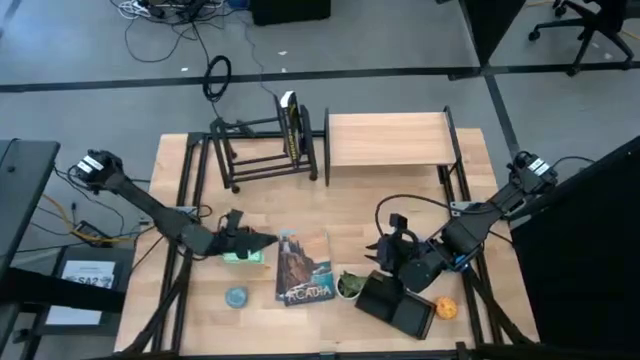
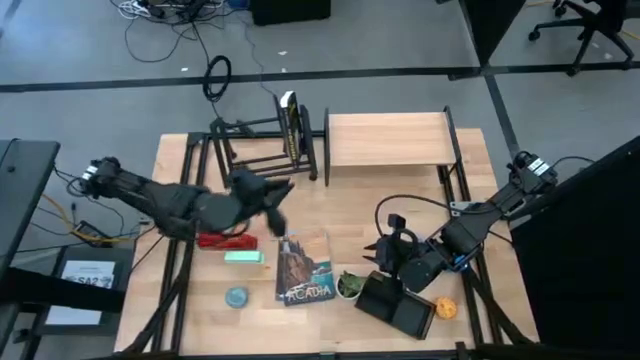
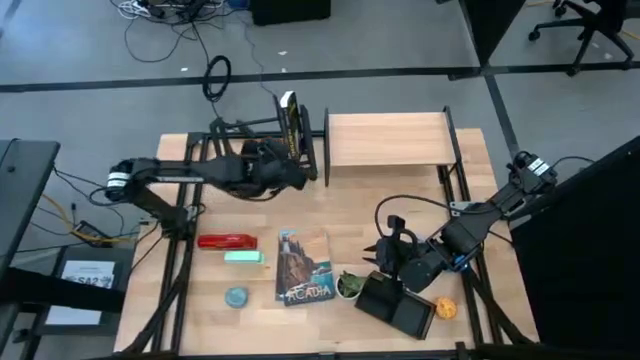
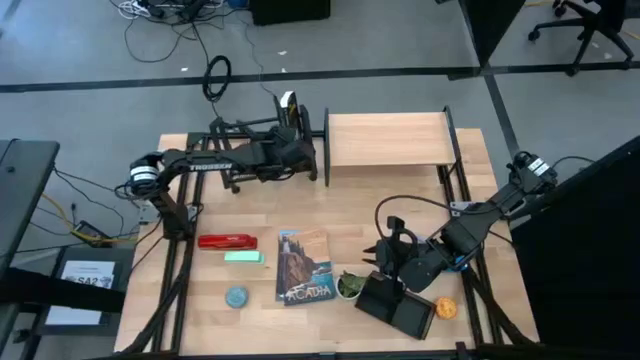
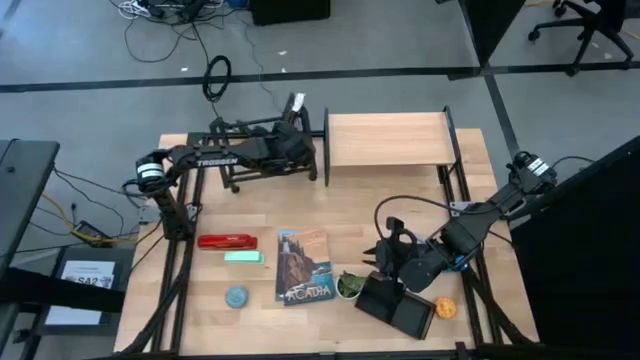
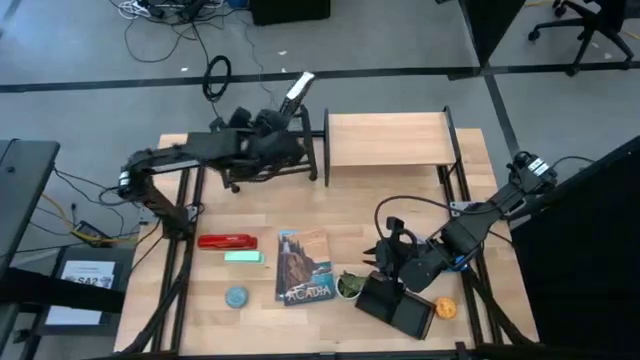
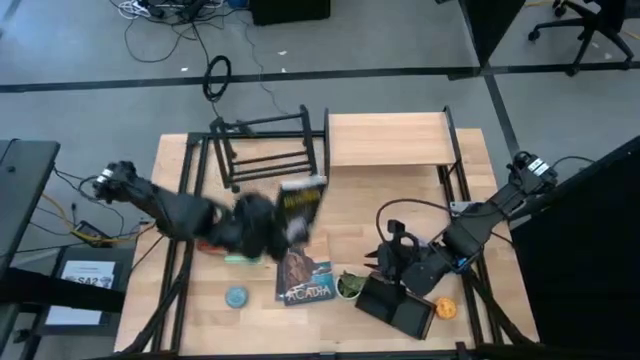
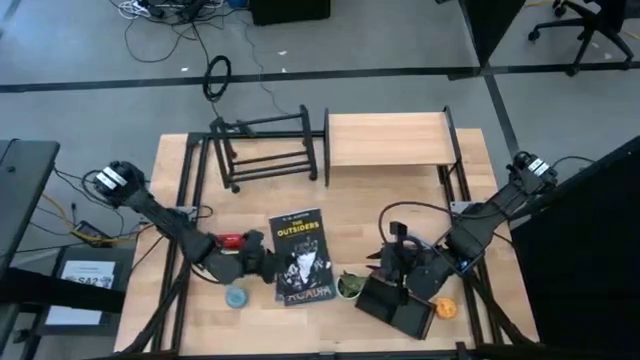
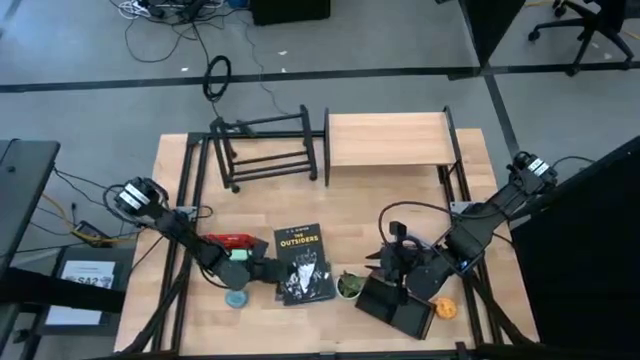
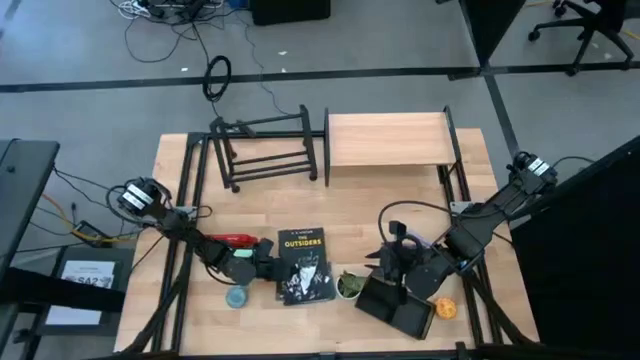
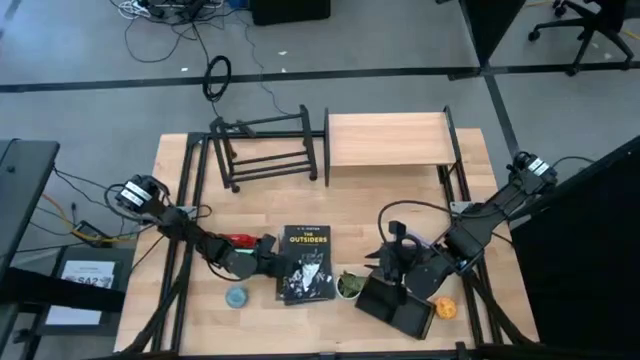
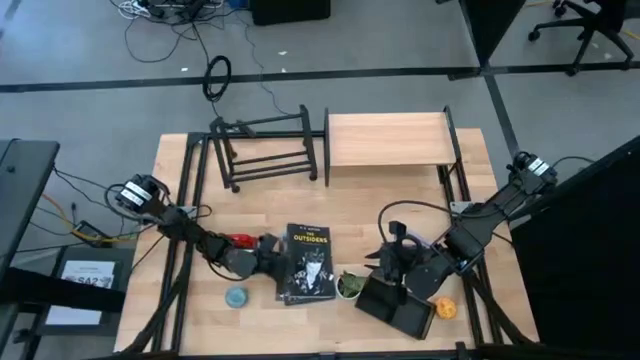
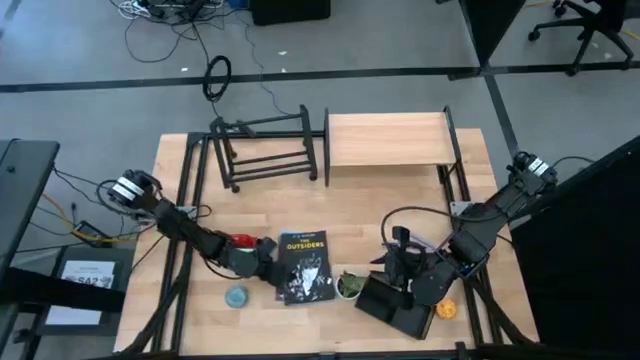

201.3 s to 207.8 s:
Task: Stock shelves
Remove the black book from the book organizer

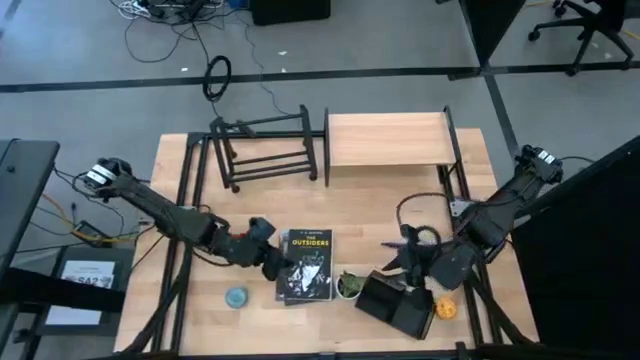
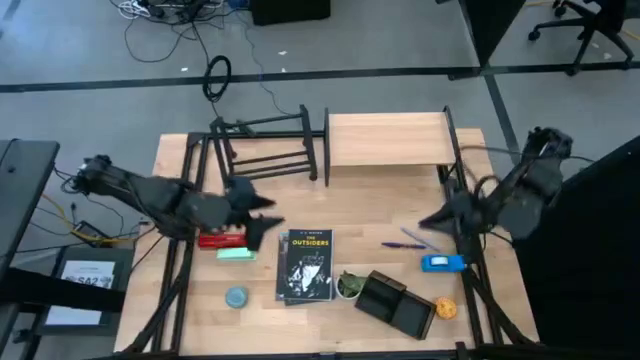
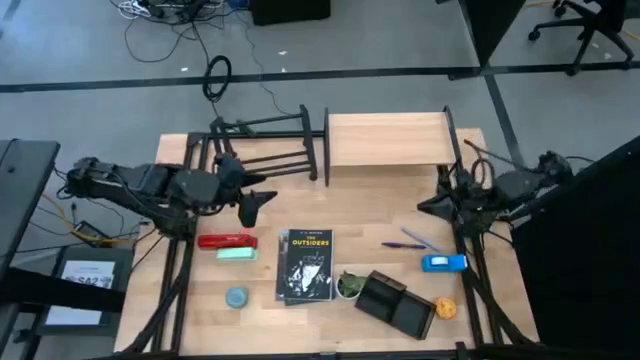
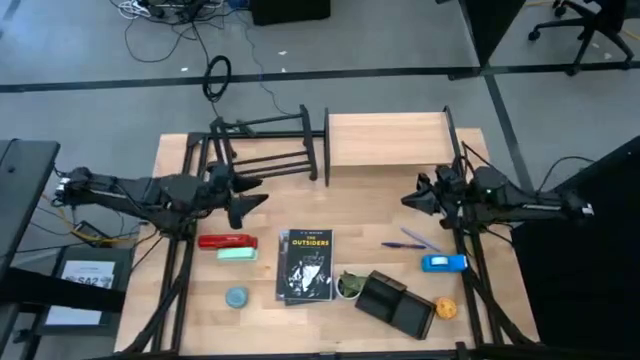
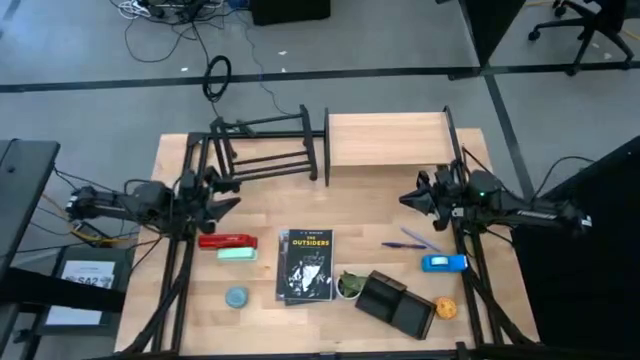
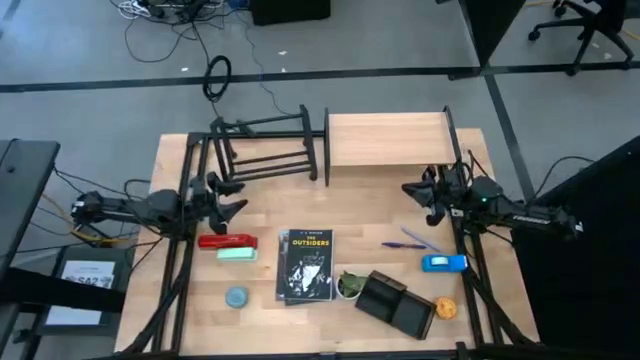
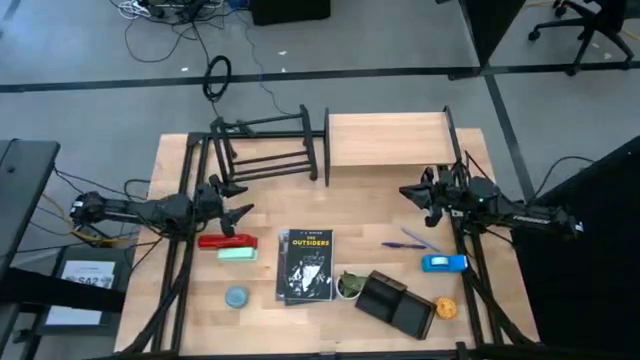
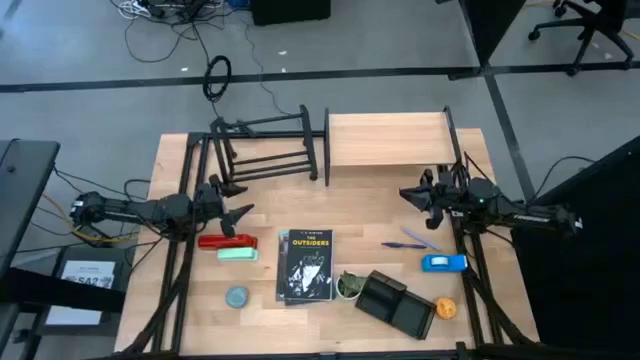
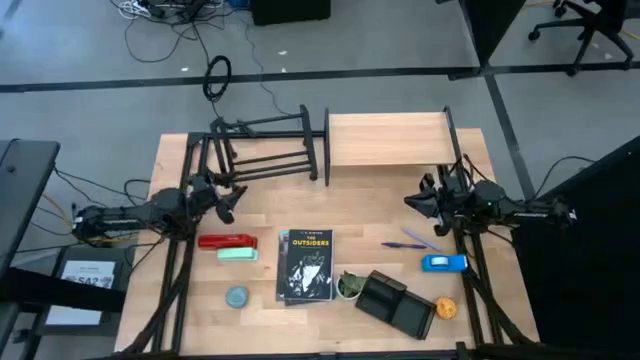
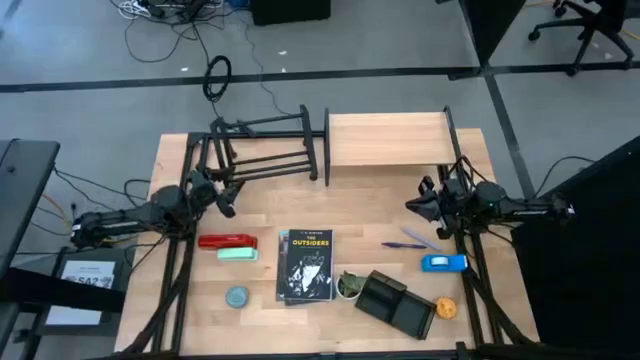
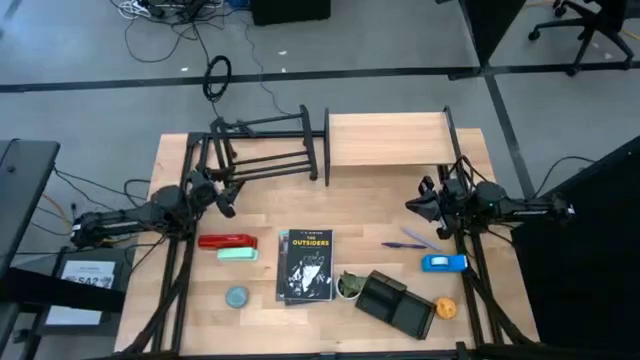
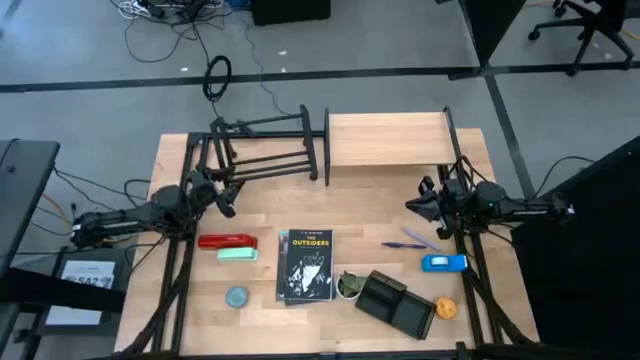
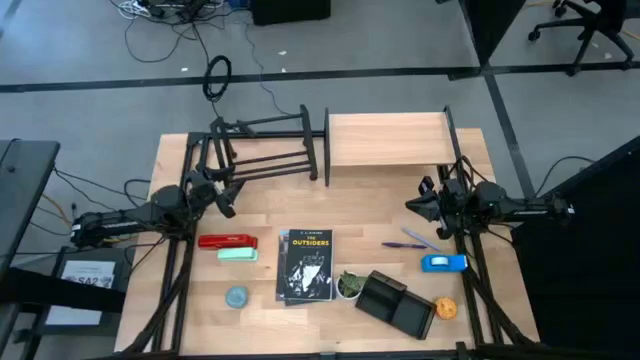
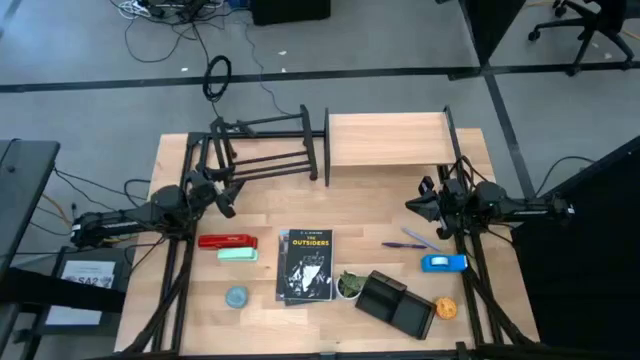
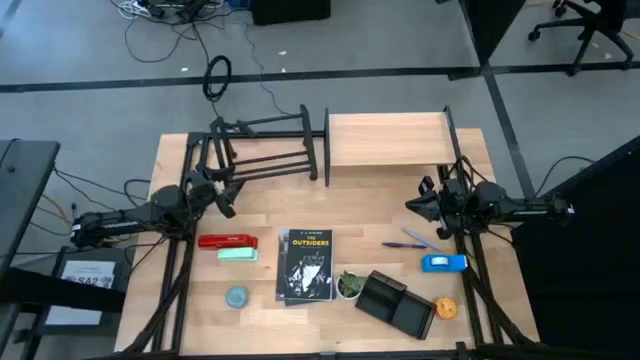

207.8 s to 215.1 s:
Return to Home Position

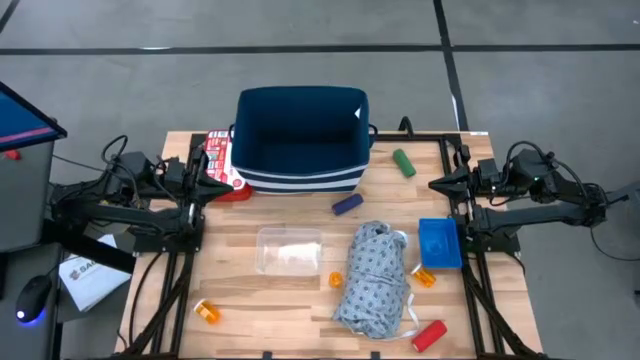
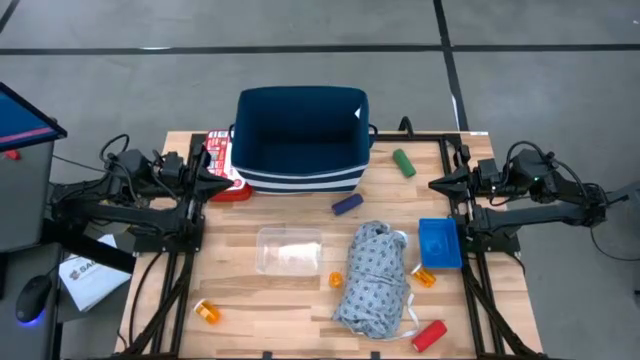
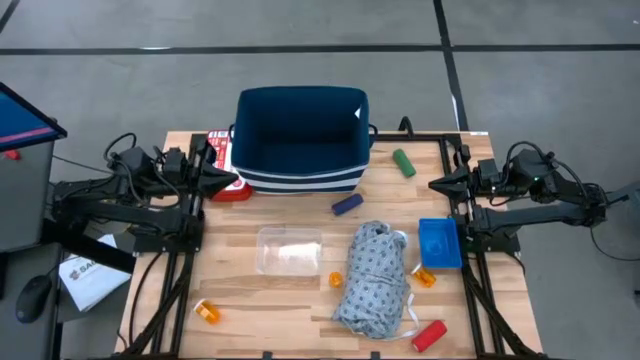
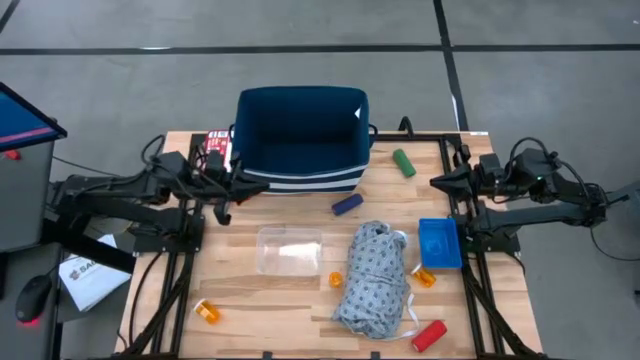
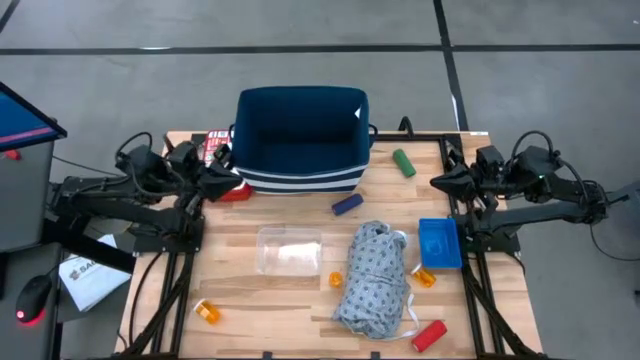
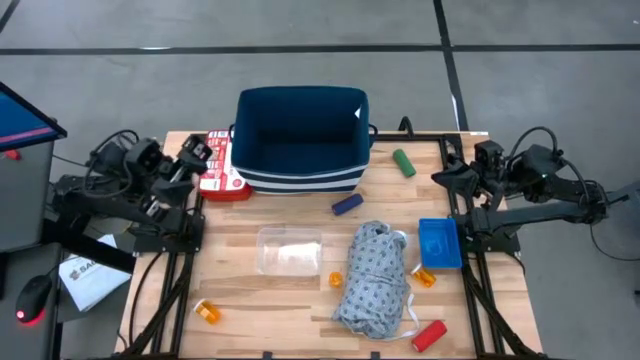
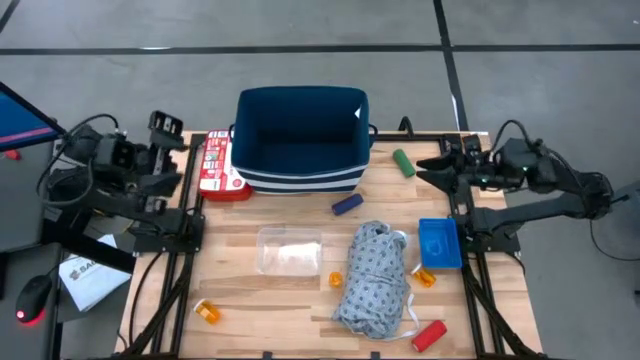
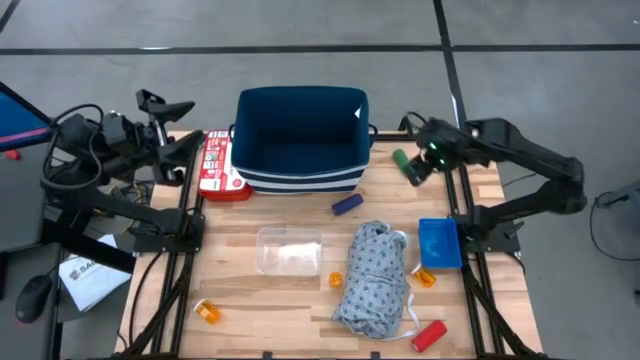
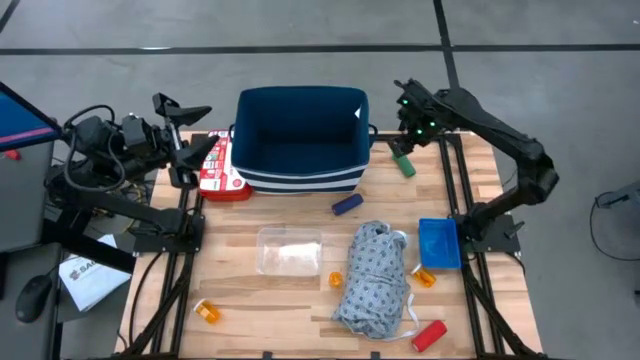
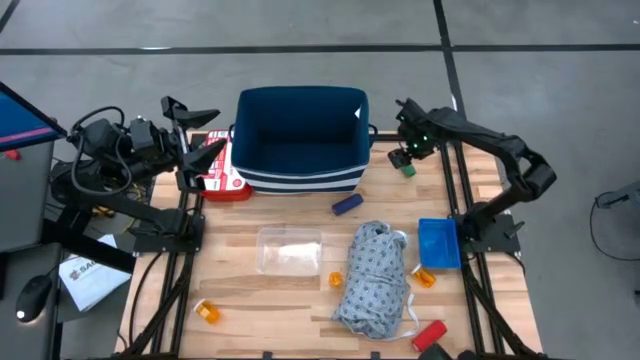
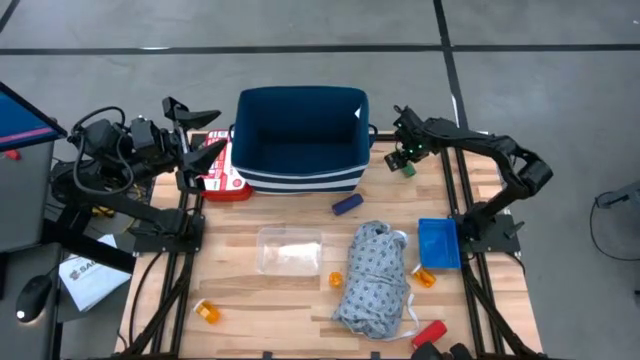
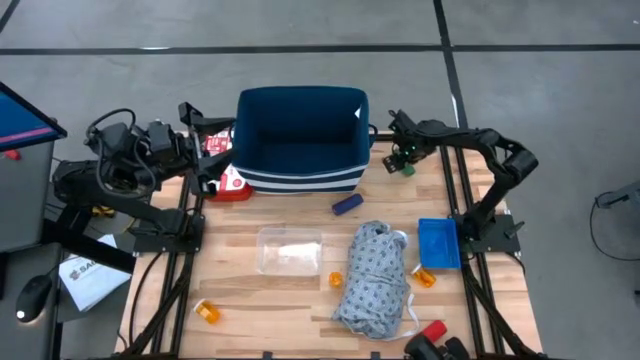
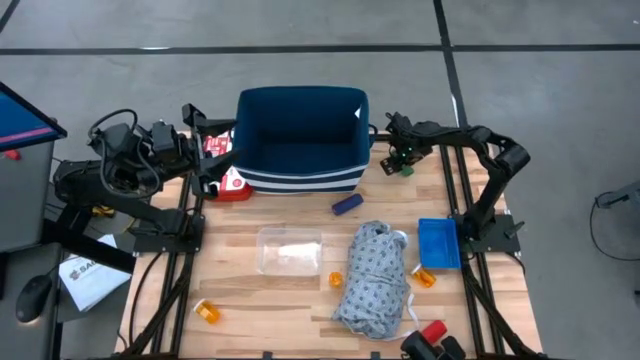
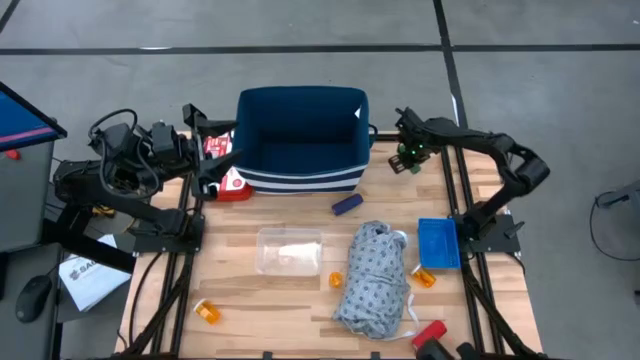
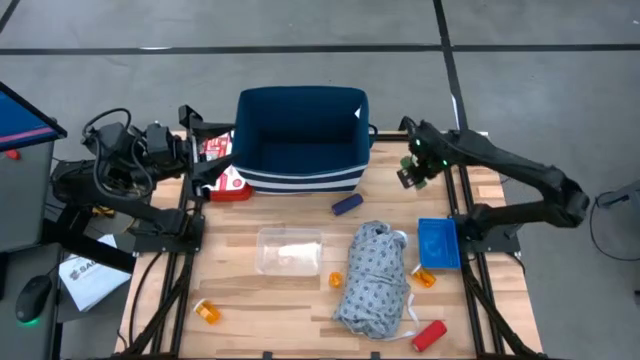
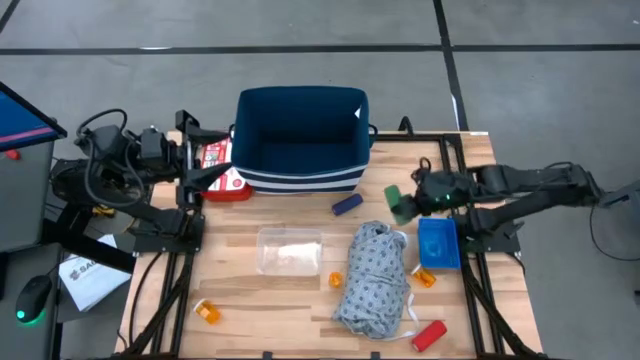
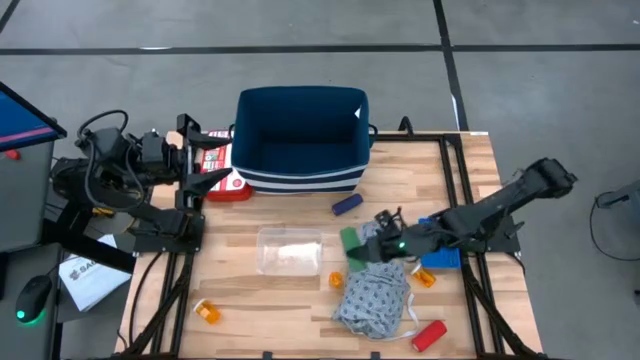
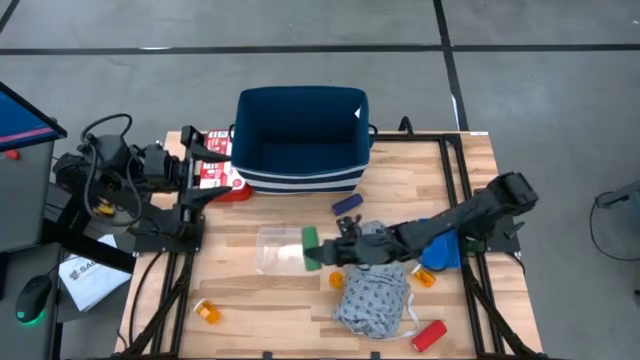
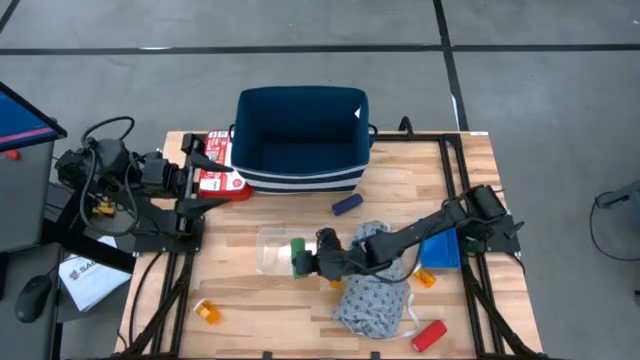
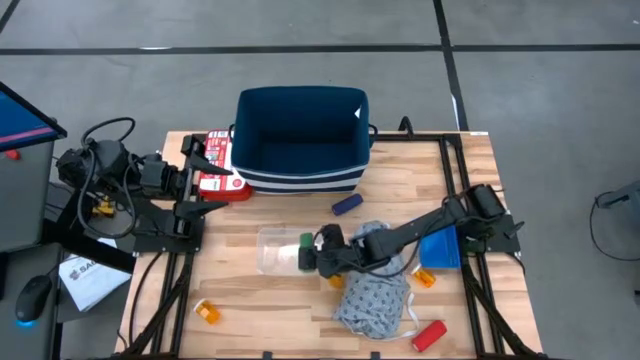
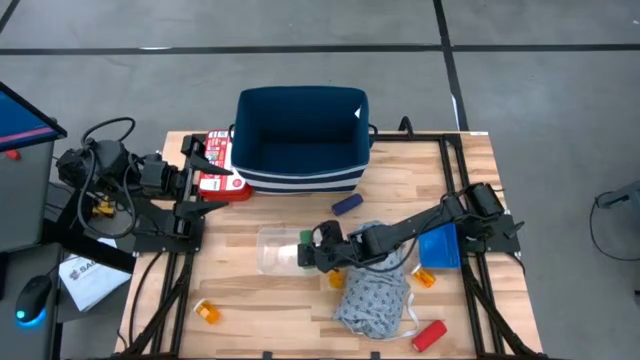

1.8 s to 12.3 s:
Task: Pick & place medical supplies in basket/bin
Put the green bandage into the transparent bin
